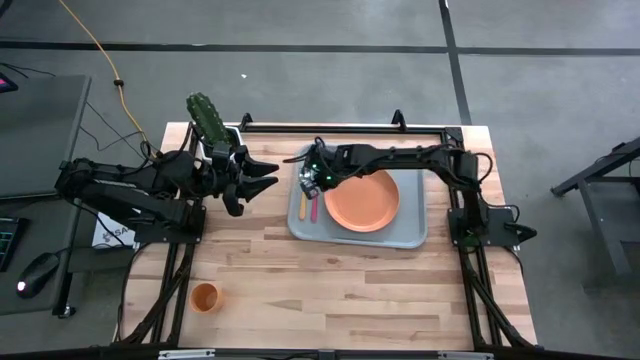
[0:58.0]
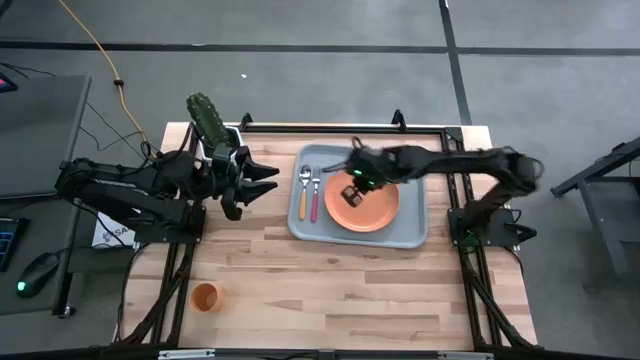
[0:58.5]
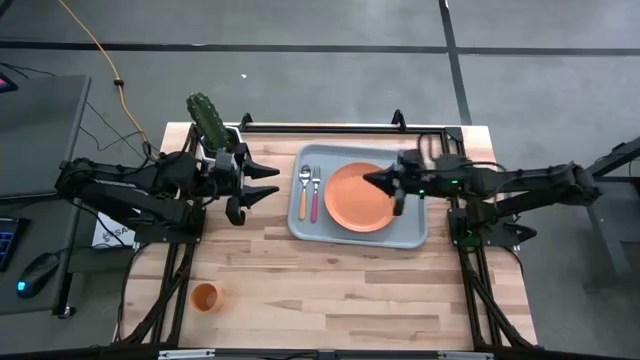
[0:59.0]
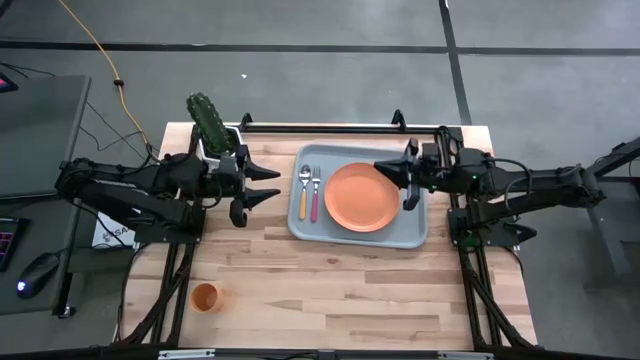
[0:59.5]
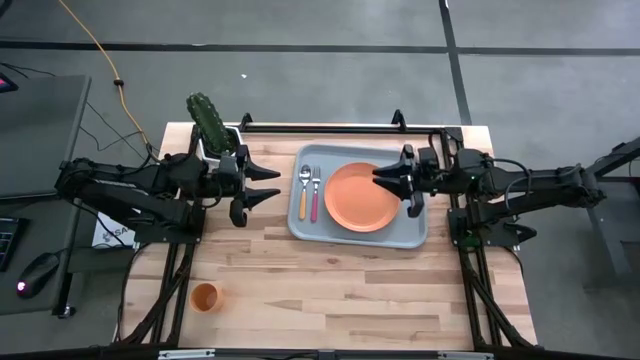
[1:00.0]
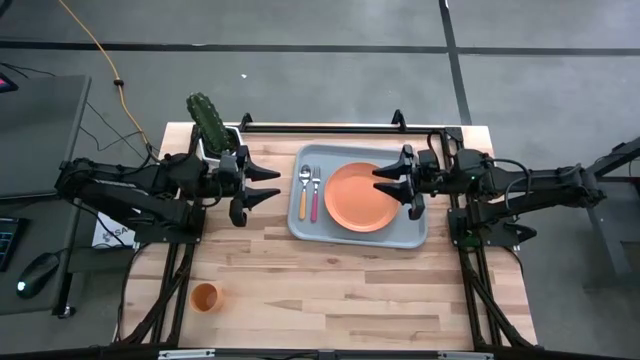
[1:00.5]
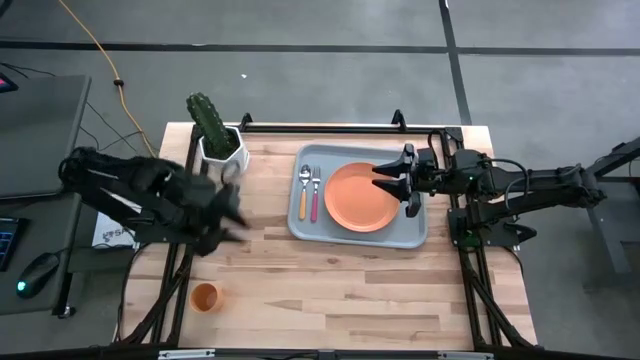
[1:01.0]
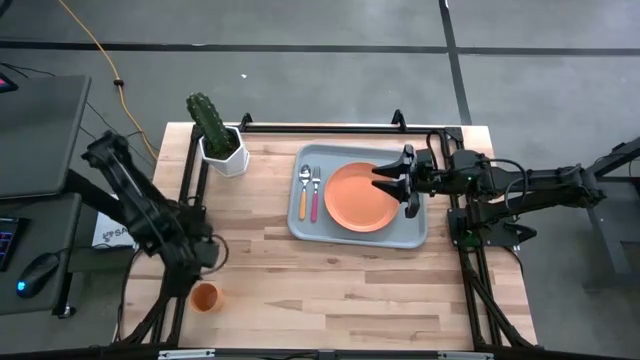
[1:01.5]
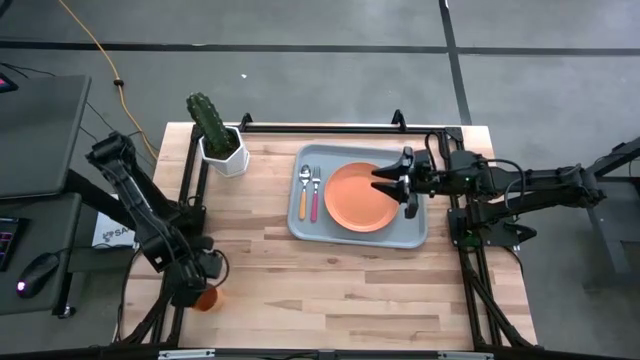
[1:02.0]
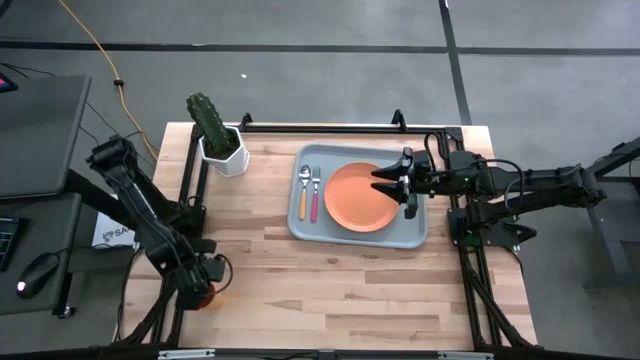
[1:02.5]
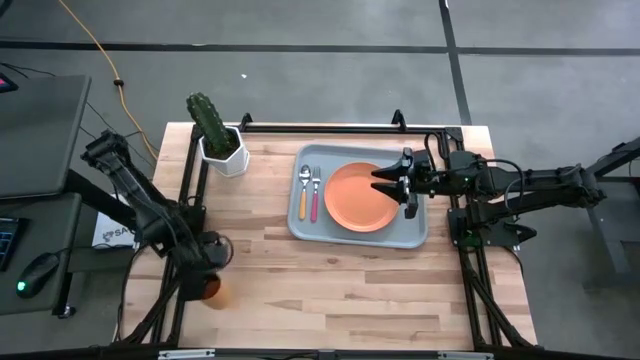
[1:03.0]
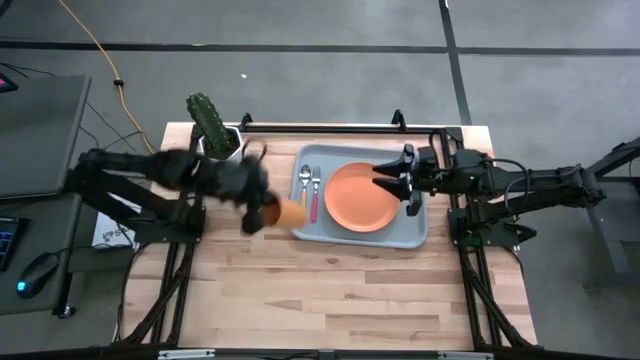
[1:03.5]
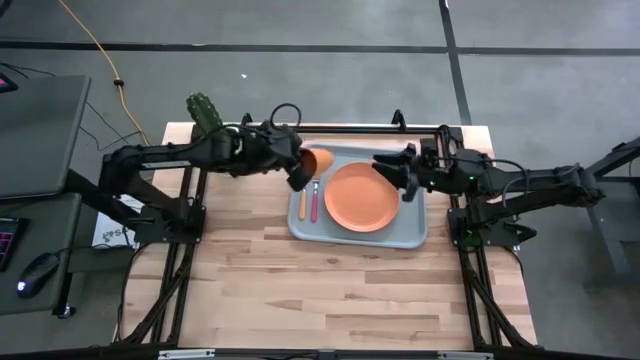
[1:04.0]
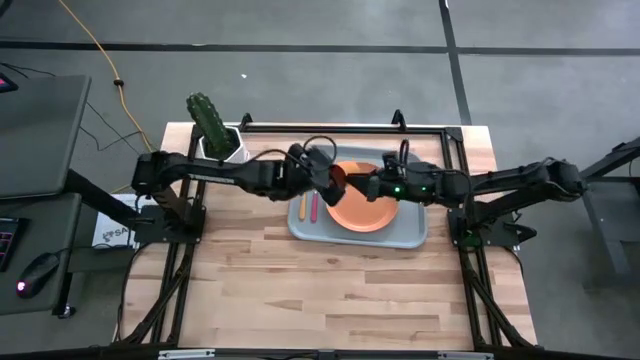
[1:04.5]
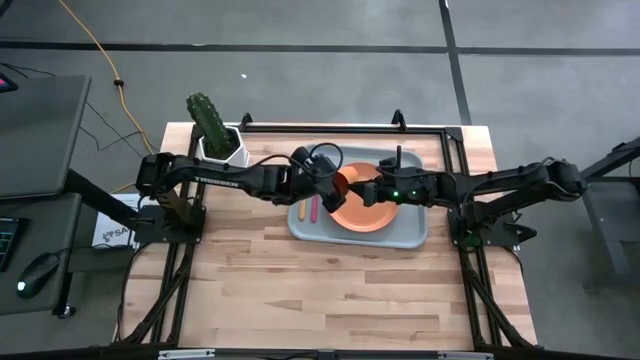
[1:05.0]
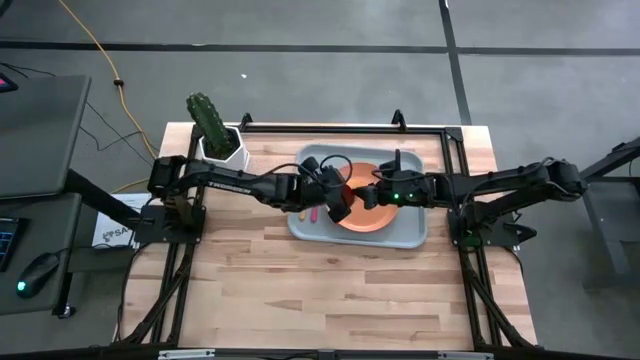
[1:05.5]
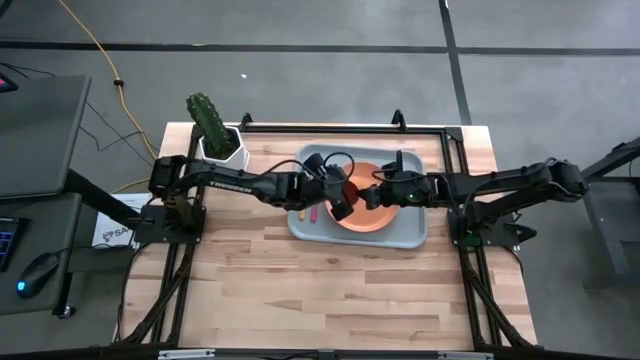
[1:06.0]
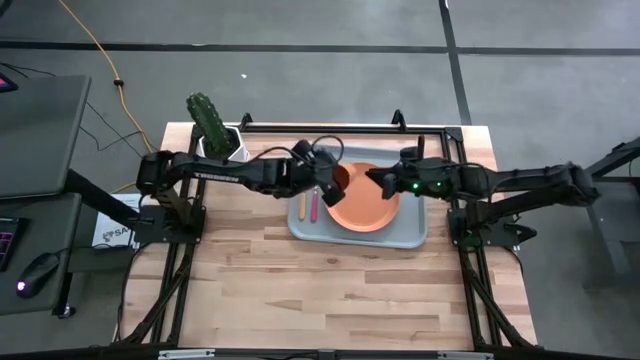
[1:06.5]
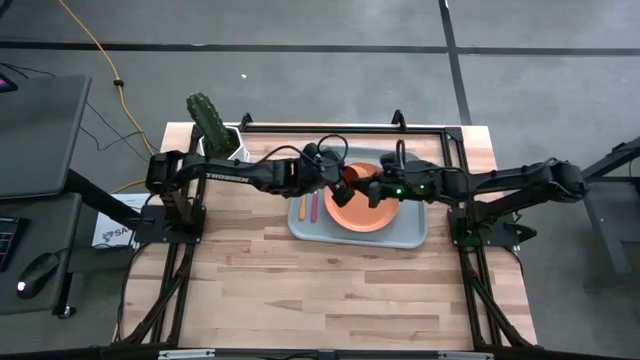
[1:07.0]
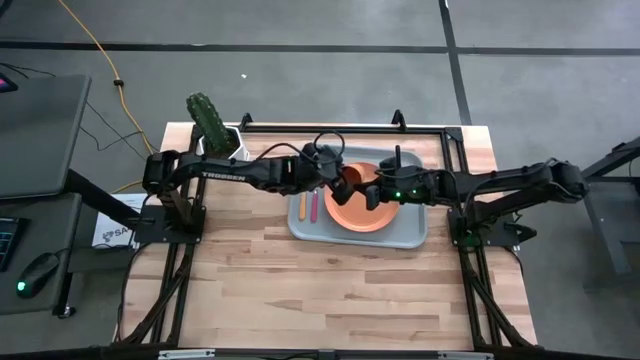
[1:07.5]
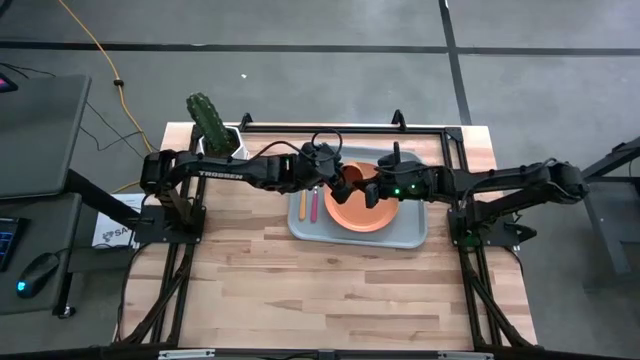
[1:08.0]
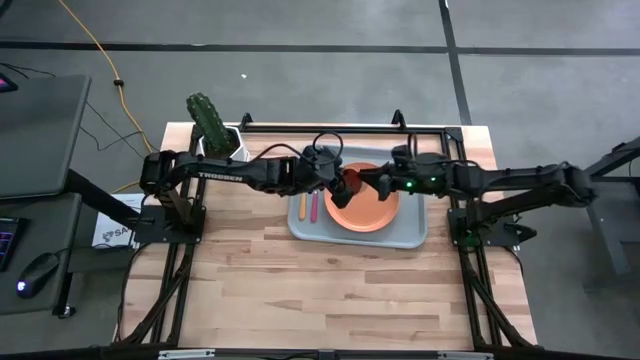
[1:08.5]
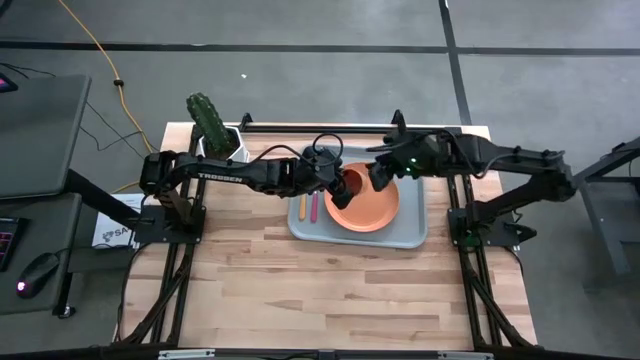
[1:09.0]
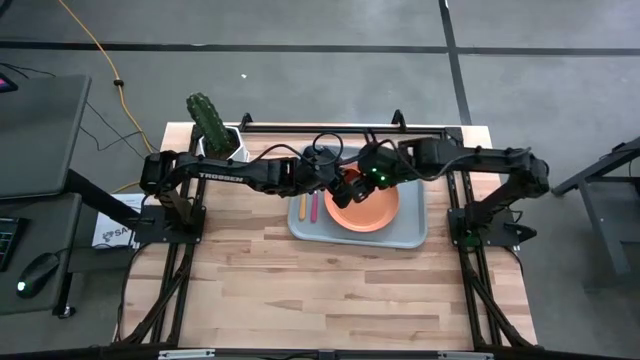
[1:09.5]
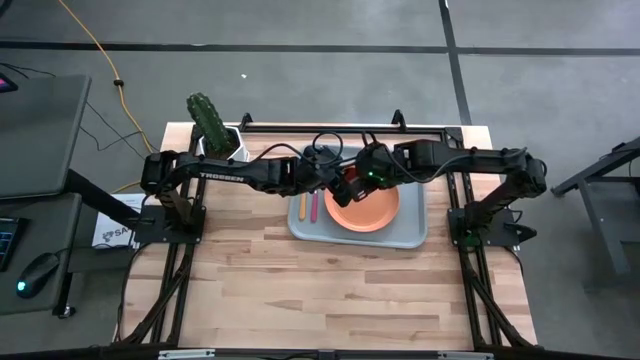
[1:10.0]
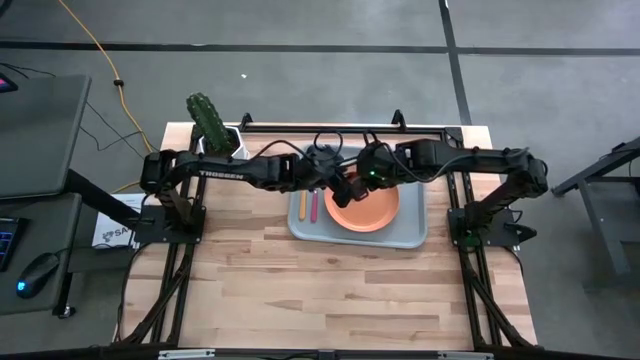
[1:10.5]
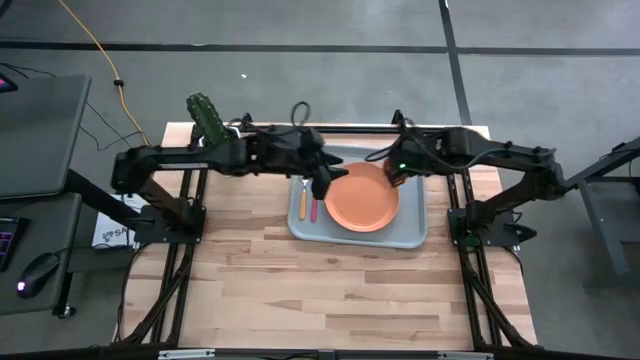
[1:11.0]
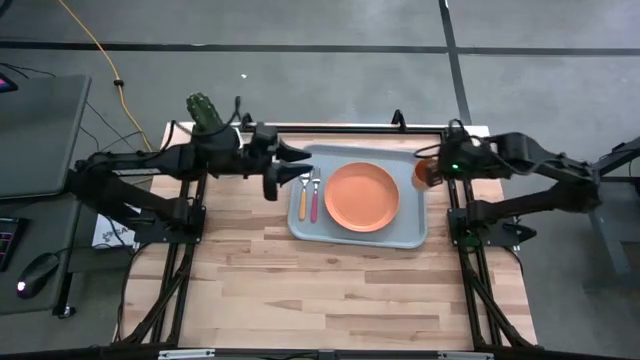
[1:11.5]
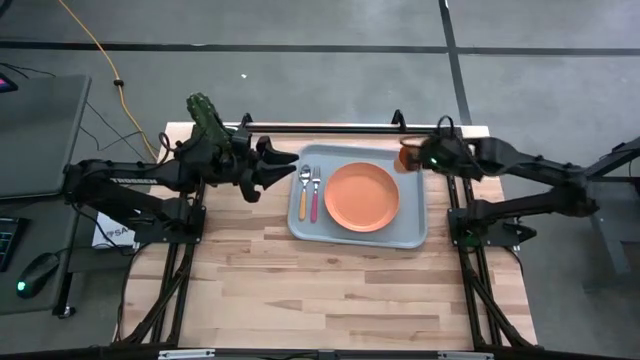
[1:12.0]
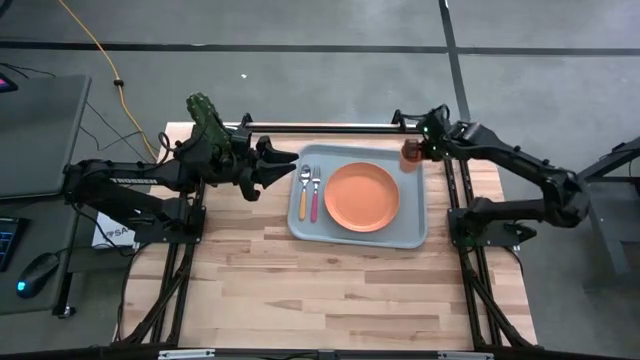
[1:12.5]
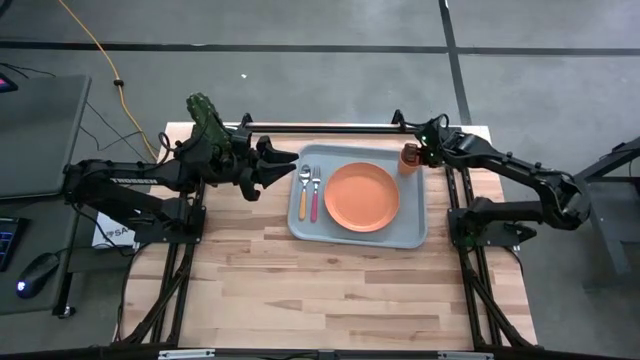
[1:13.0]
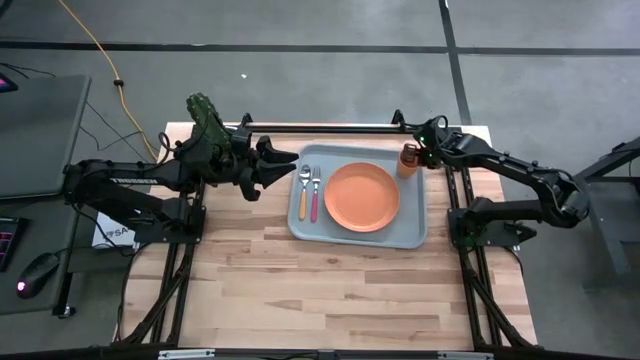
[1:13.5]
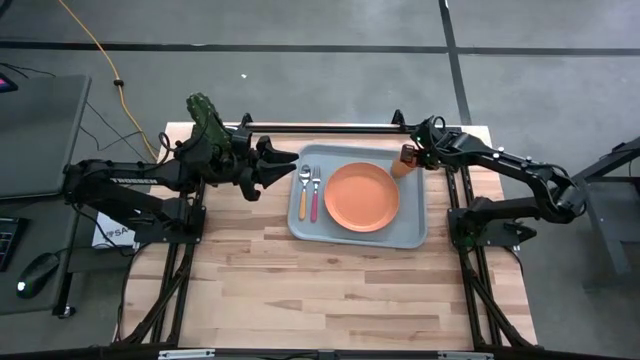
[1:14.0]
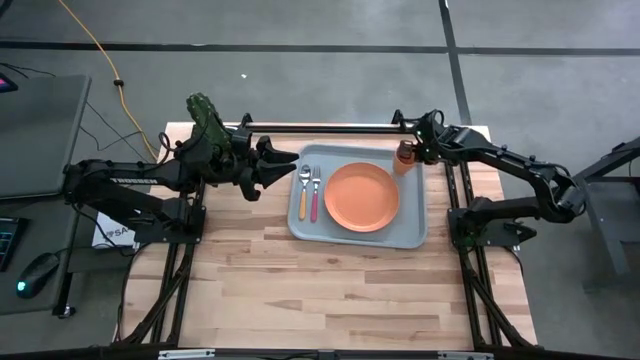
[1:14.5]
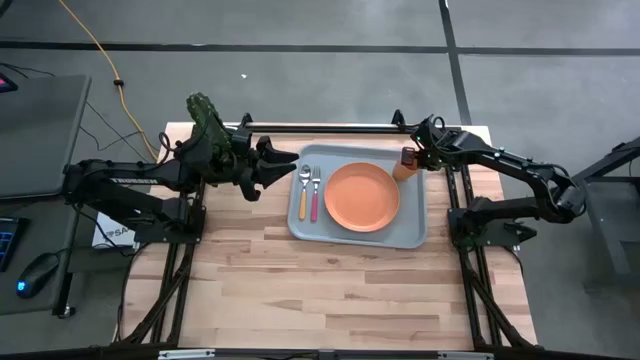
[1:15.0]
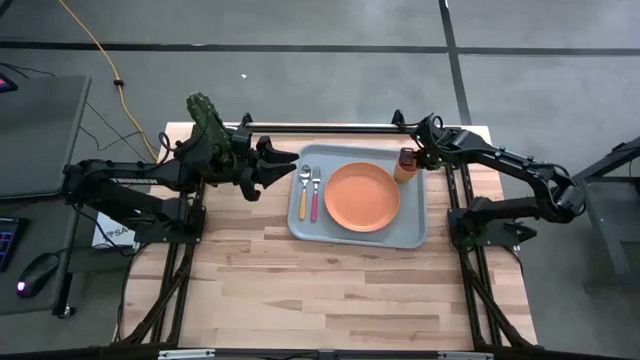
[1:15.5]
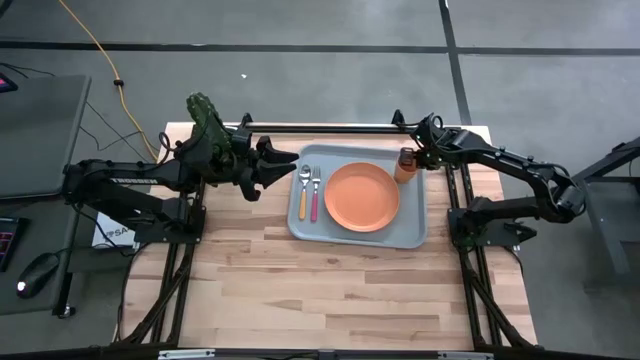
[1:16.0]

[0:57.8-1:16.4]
Task: Pick and place plate/cup/fork/spoon on tray
Put the orange cup to the top right of the orange plate on the gray serving tray

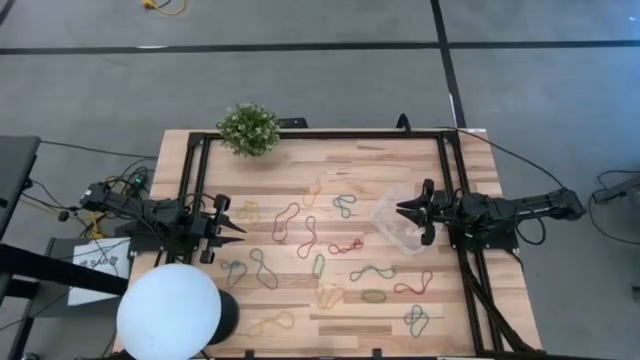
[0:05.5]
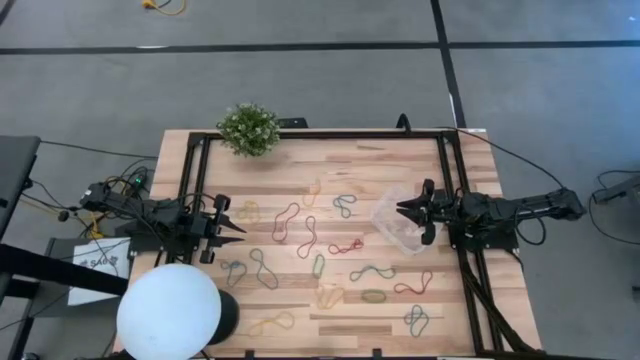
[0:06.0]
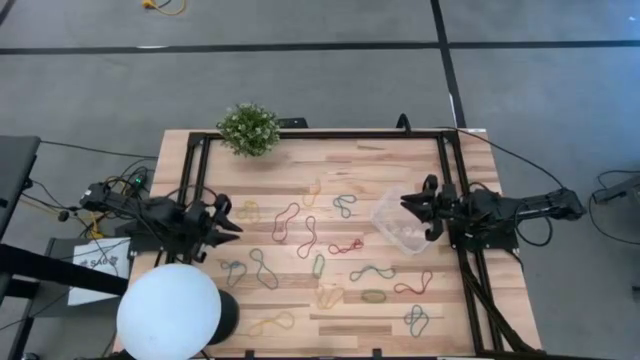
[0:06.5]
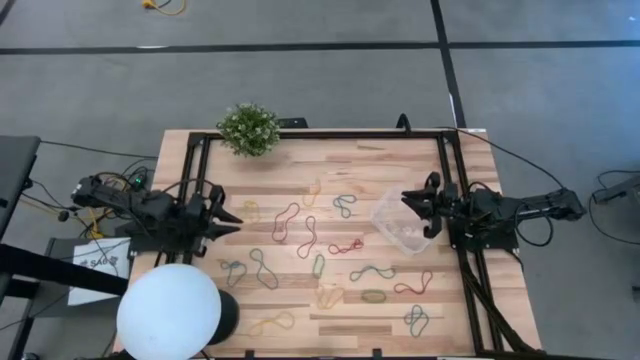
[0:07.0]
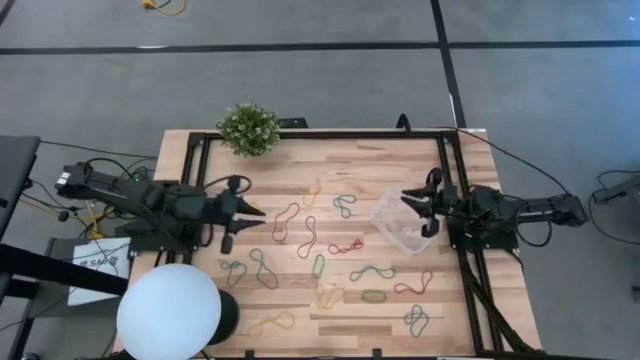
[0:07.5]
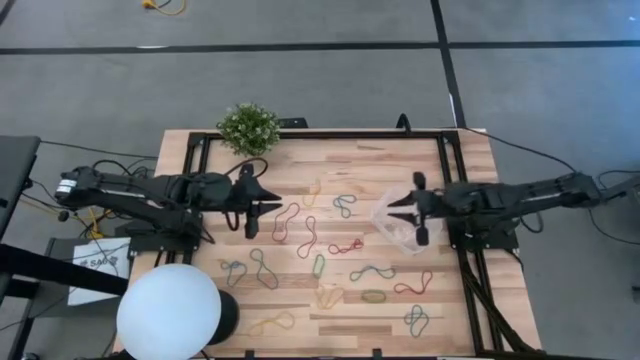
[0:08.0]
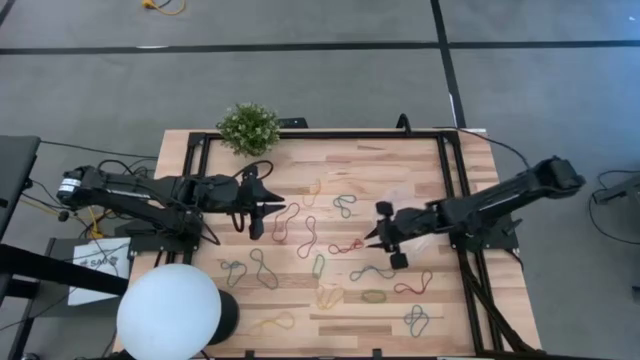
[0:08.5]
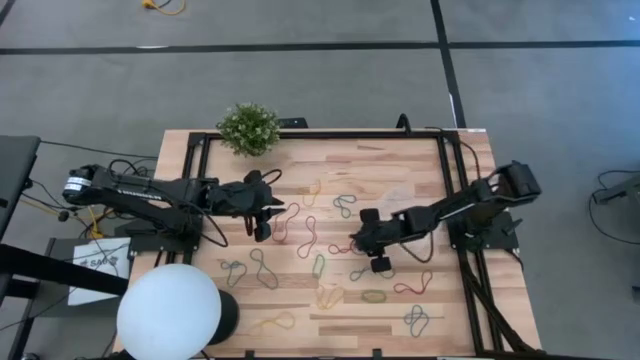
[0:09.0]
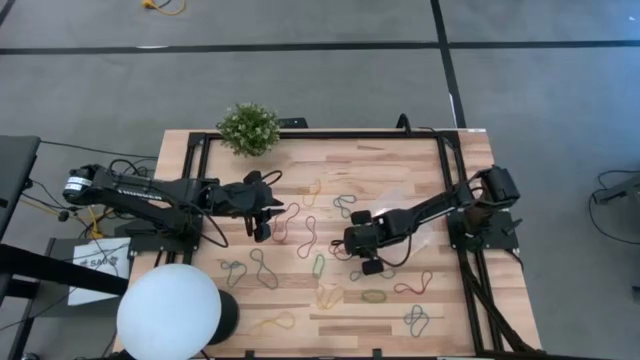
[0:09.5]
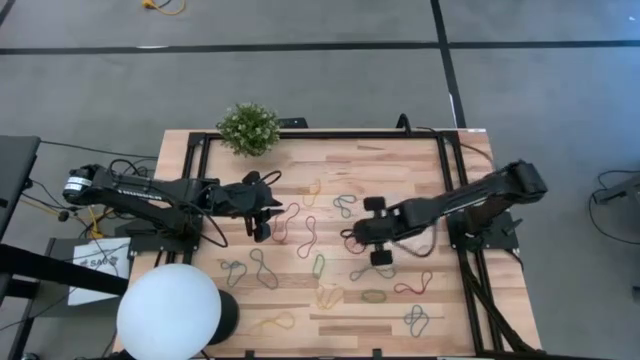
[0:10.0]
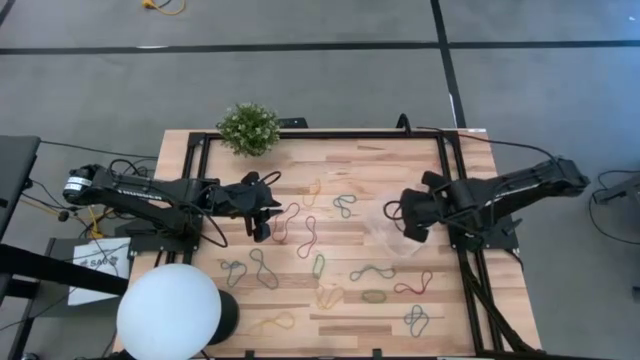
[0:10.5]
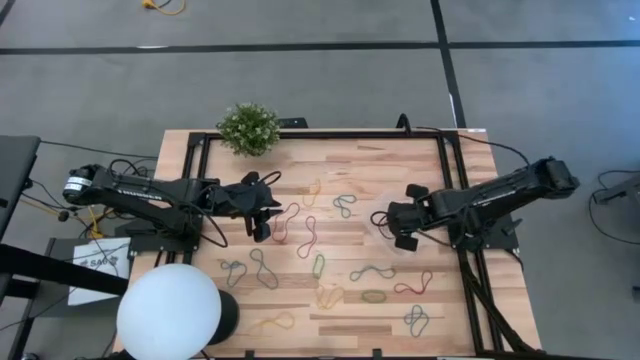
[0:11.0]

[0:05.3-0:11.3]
Task: Pick and place items into bin
Put the red rubber band into the transparent bin
